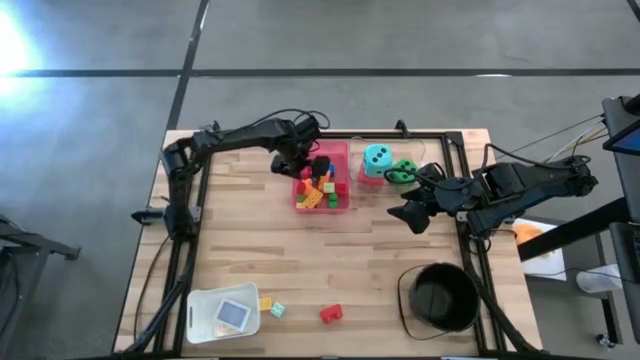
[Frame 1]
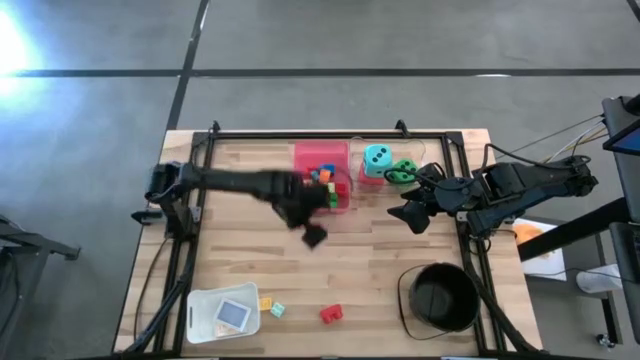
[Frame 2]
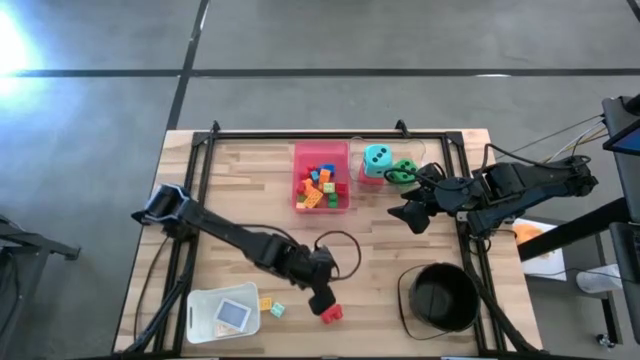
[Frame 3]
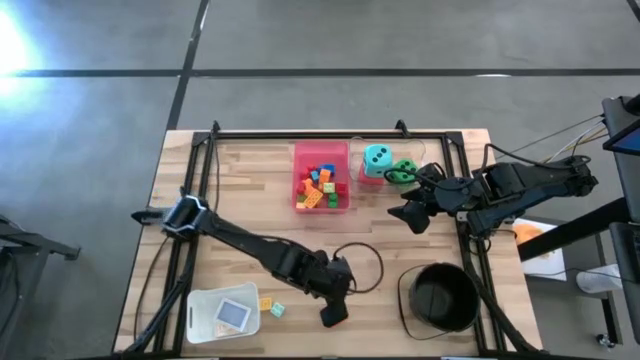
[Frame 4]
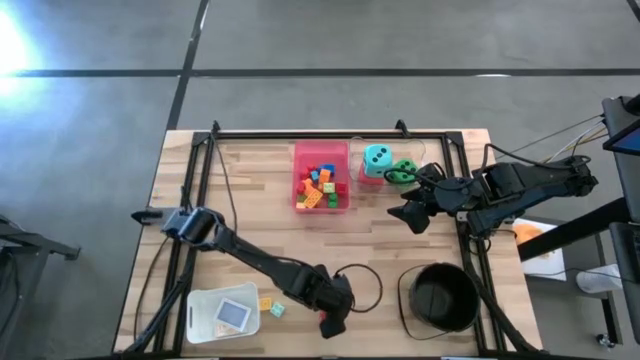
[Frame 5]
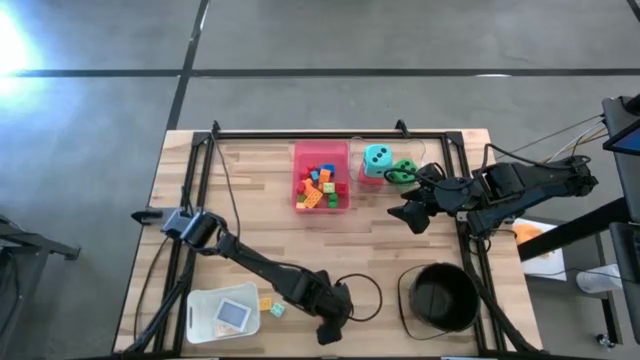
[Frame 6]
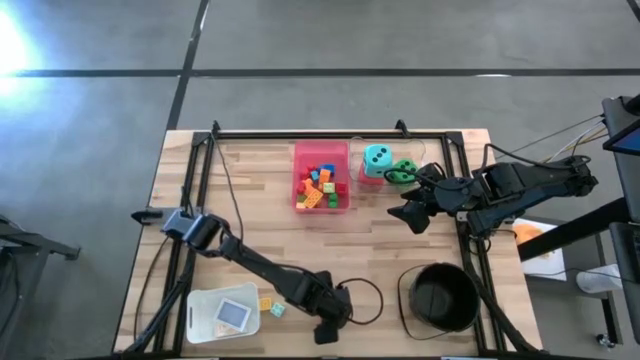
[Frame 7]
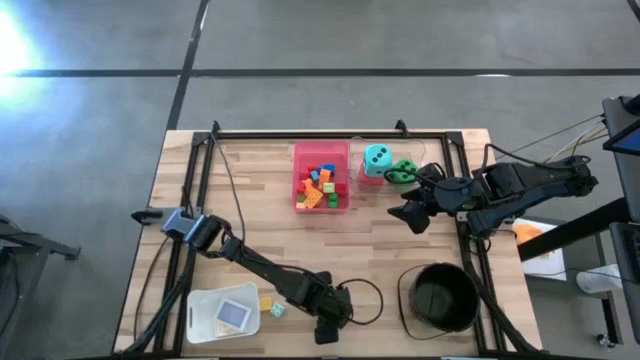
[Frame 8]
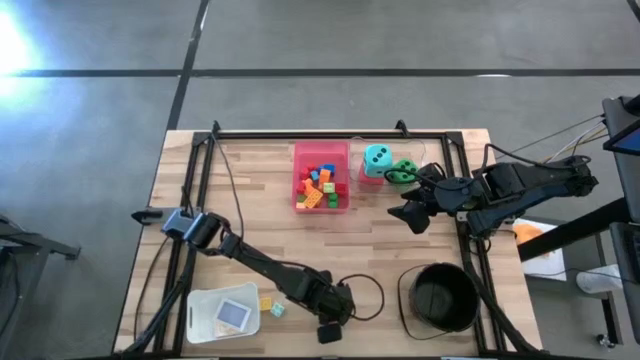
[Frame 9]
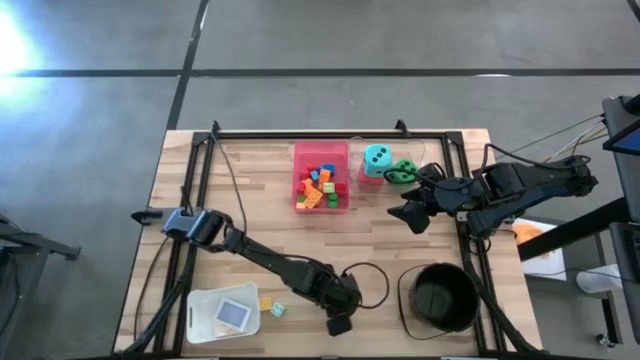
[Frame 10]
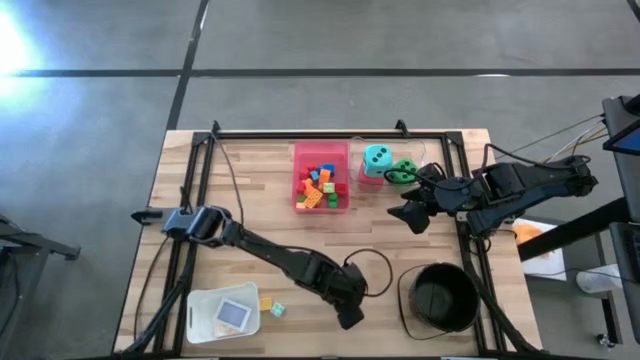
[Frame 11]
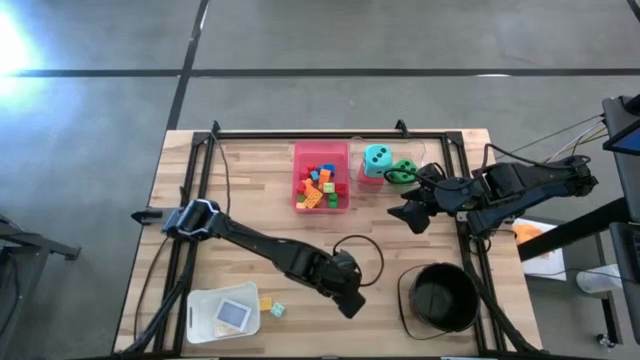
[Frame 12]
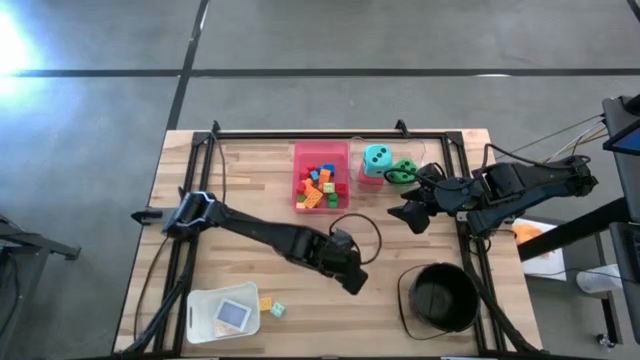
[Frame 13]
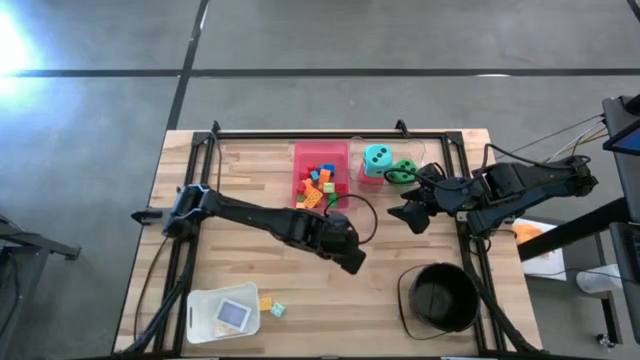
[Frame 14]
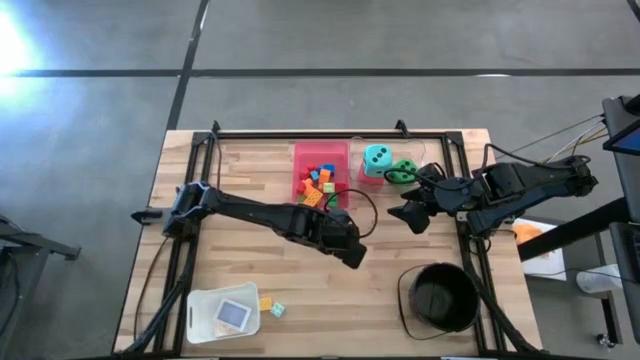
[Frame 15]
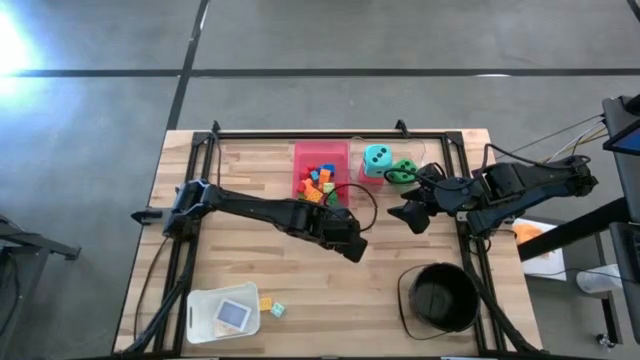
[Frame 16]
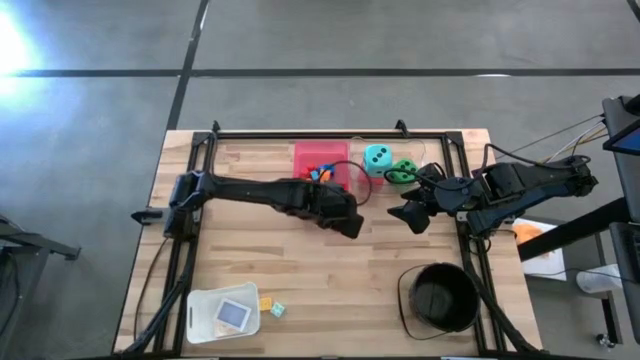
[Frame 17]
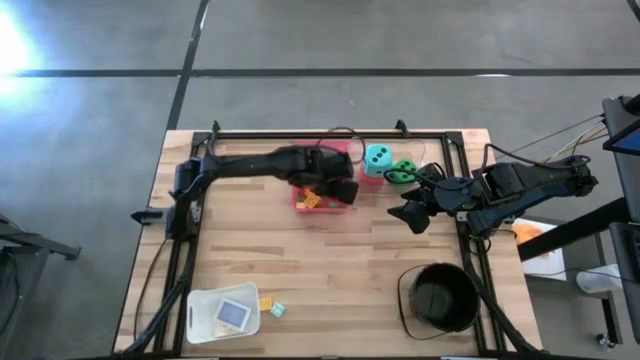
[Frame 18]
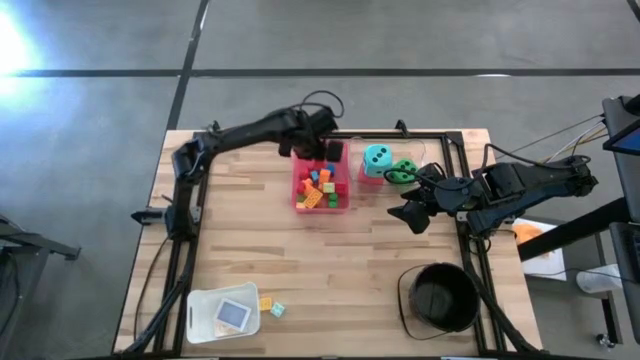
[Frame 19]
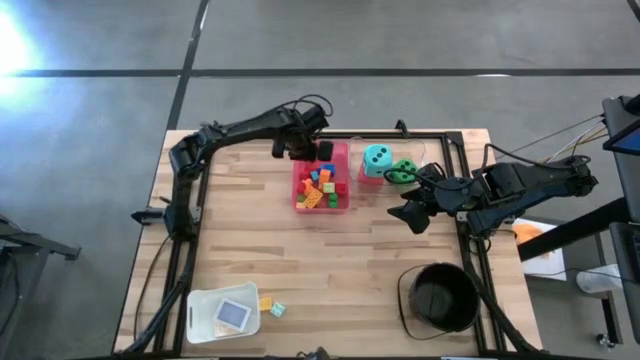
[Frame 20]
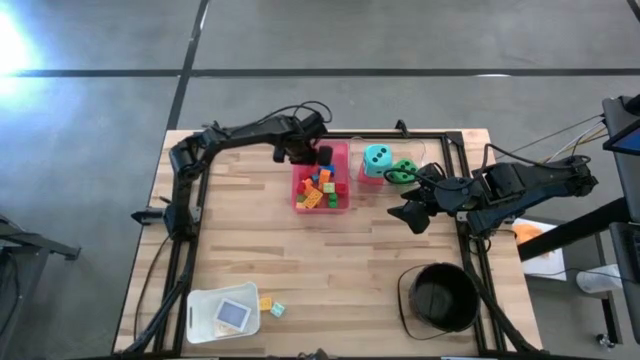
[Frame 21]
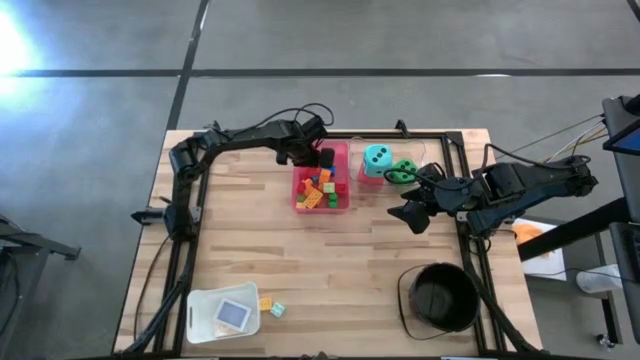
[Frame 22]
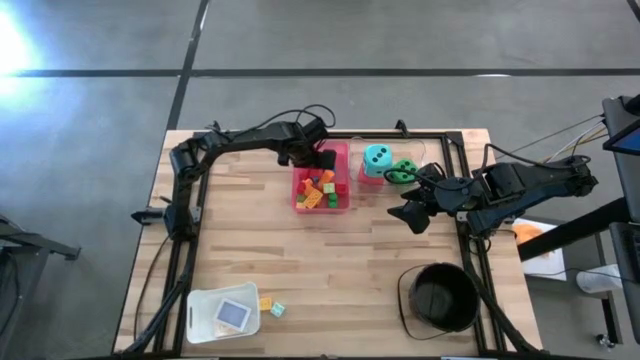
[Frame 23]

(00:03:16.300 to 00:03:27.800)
Task: Pick & Place Toys
Put the red game piece into the red bin

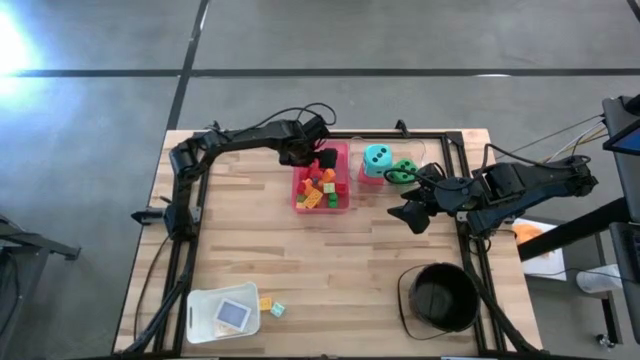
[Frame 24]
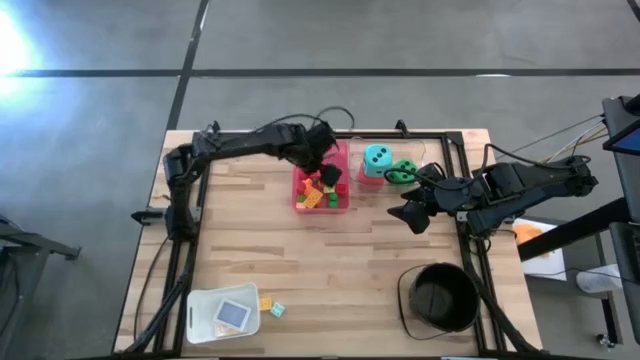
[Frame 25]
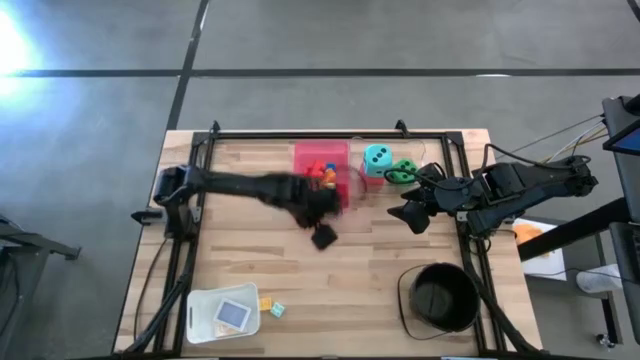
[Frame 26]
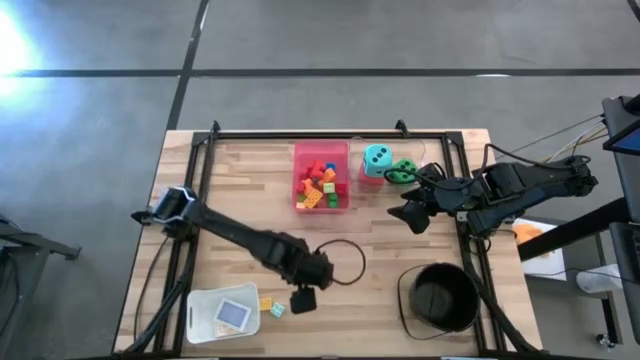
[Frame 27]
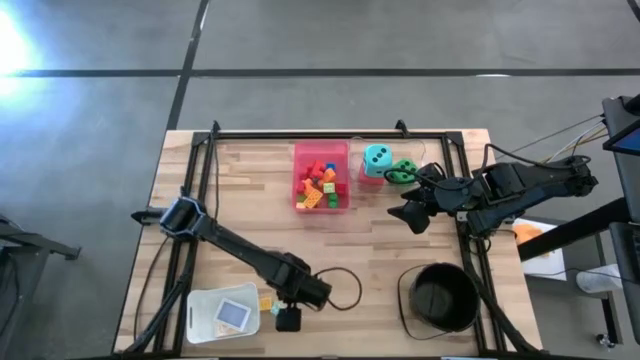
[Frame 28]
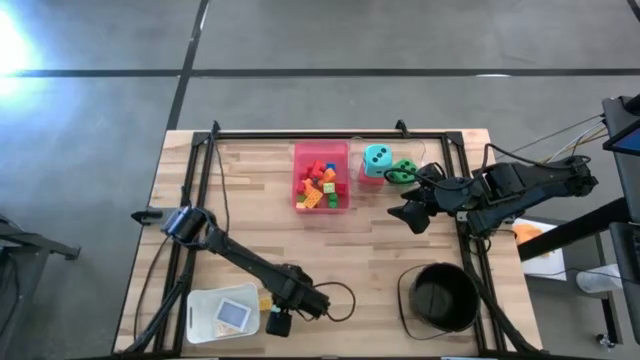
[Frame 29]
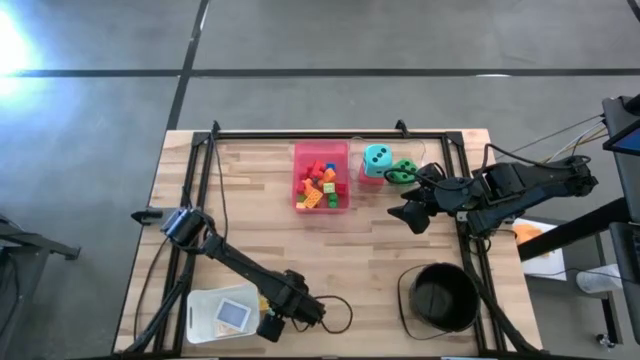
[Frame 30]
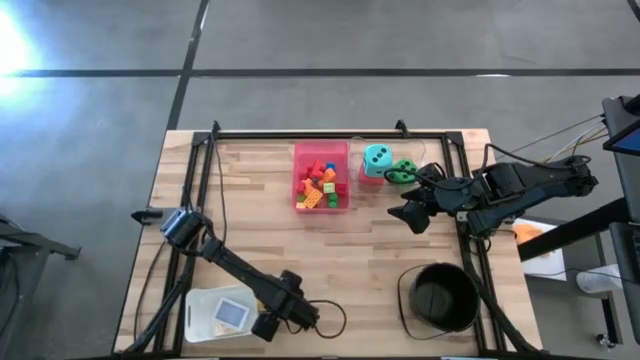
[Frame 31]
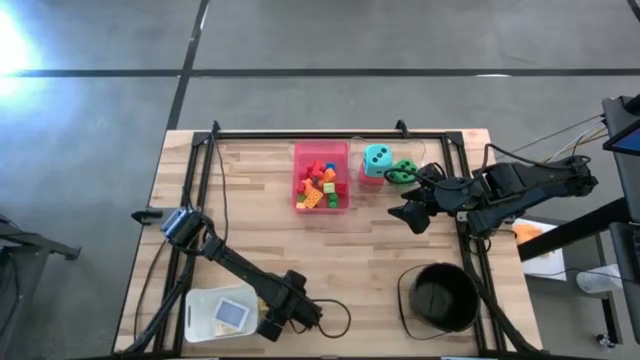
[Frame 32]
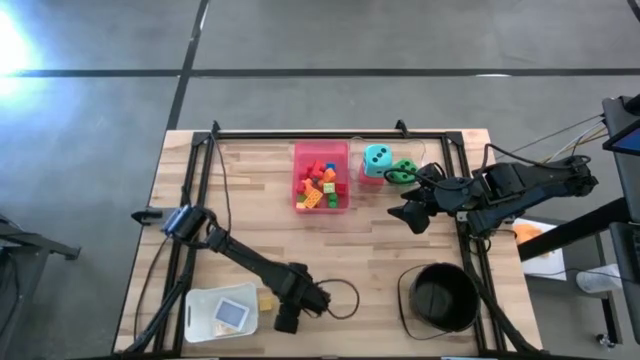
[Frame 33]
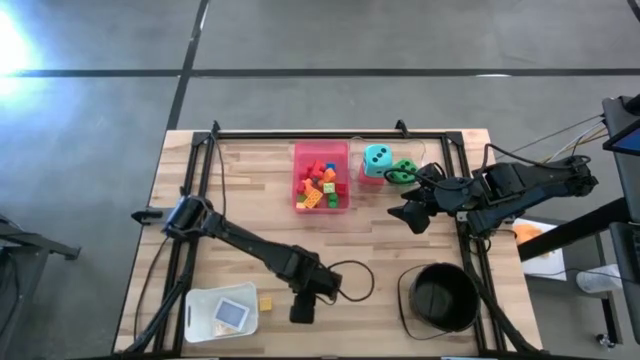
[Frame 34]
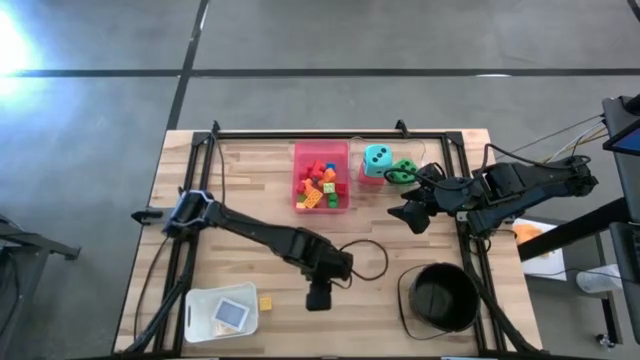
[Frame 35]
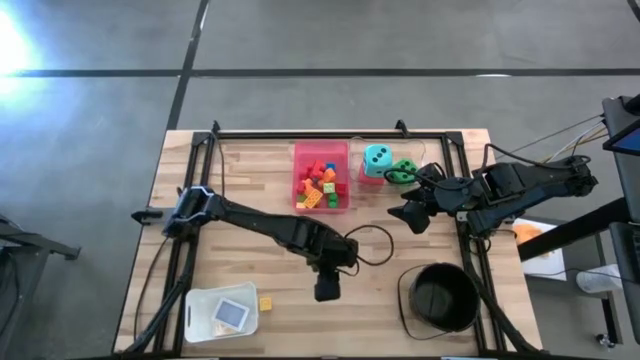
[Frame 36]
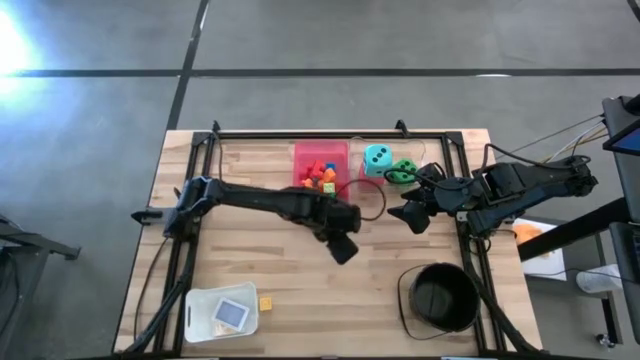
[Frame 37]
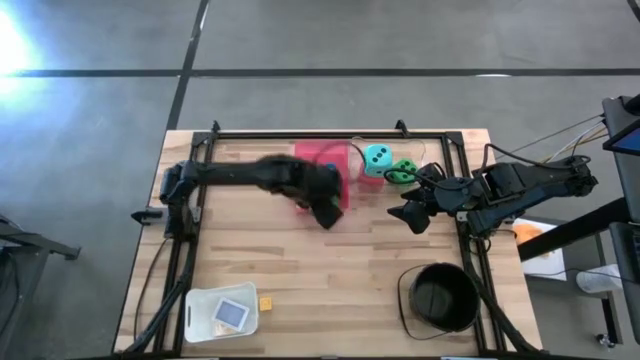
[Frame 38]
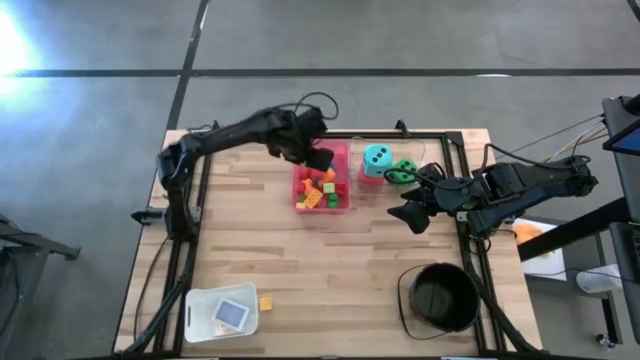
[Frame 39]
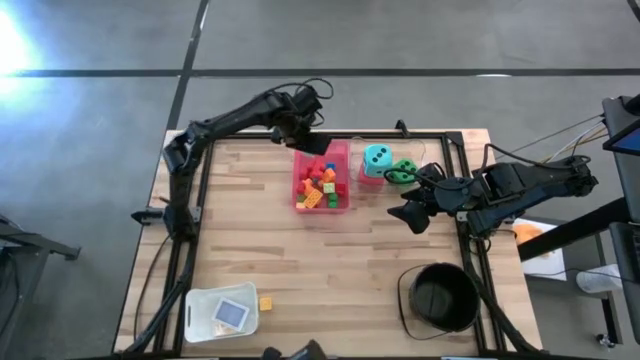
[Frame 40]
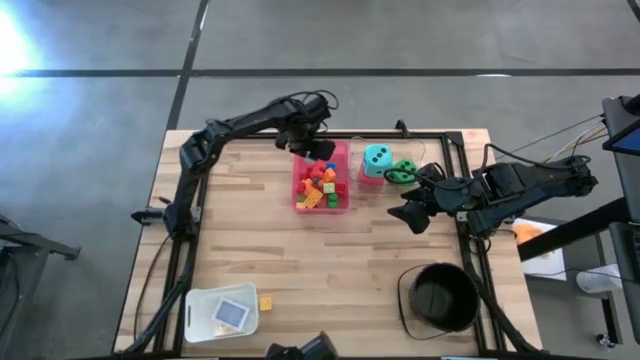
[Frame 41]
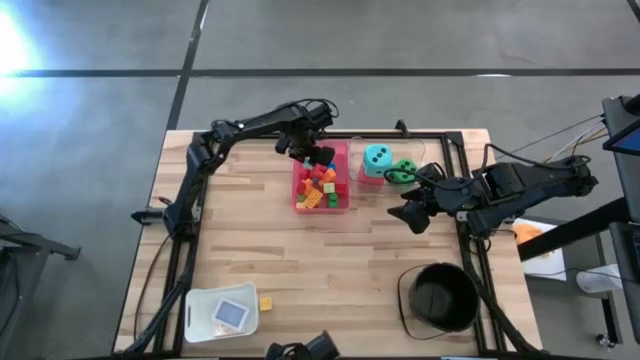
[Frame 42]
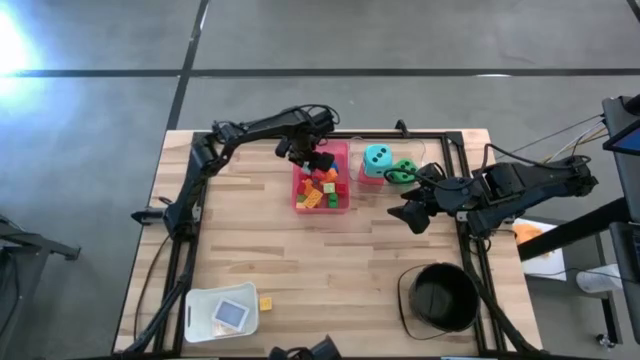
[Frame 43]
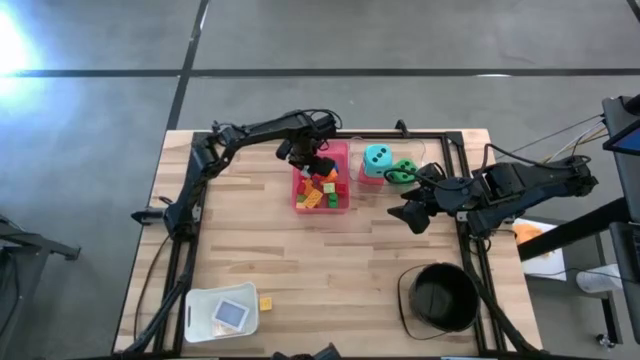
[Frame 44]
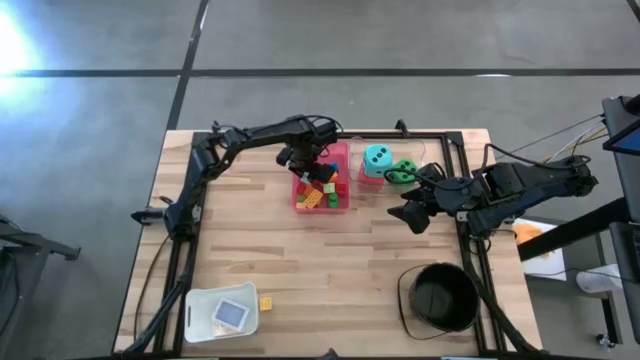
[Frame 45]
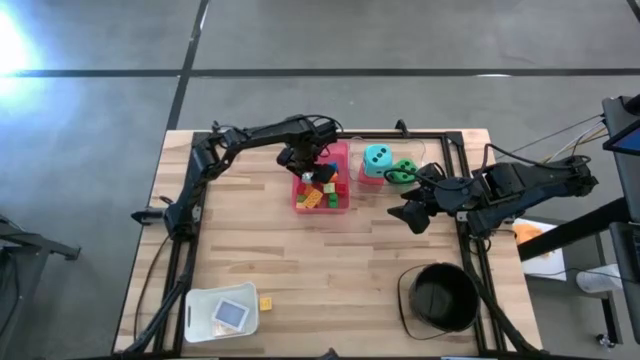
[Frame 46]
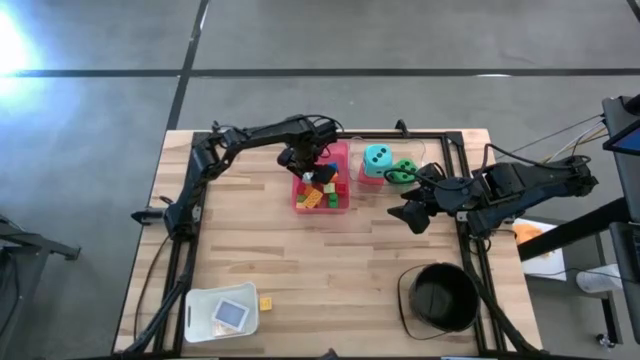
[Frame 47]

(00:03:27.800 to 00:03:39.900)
Put the light blue game piece into the red bin
